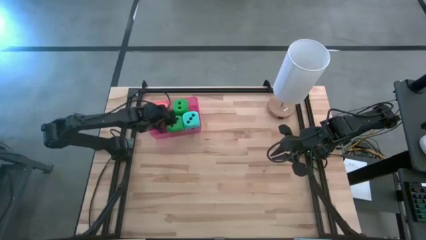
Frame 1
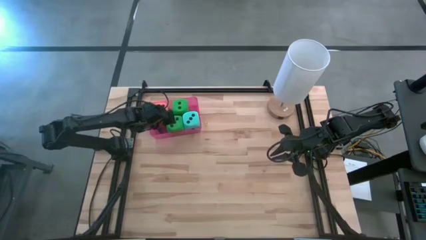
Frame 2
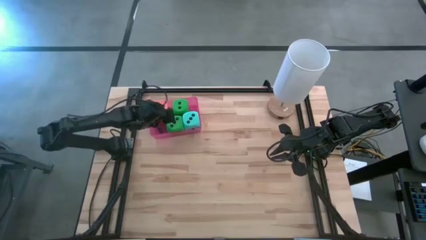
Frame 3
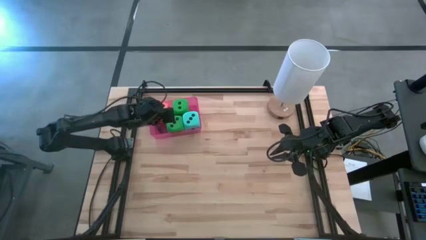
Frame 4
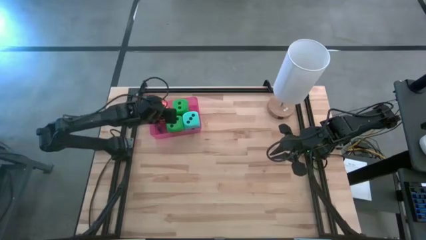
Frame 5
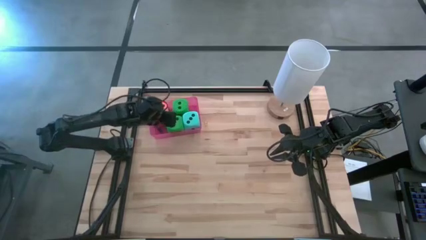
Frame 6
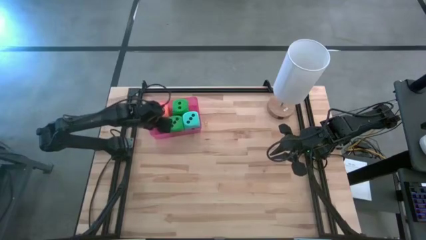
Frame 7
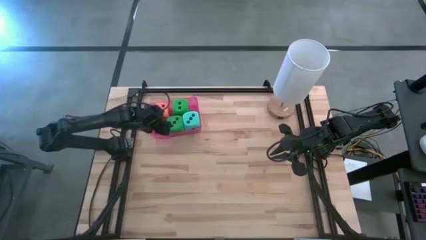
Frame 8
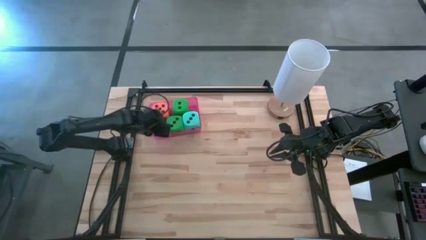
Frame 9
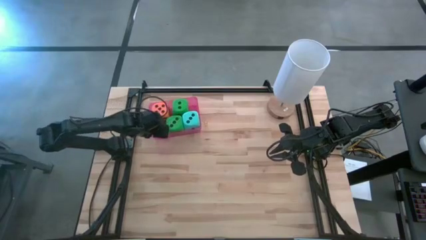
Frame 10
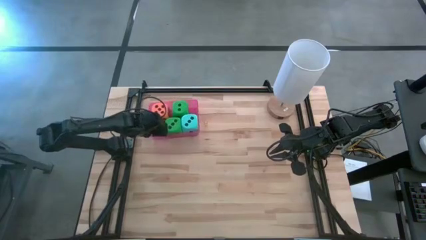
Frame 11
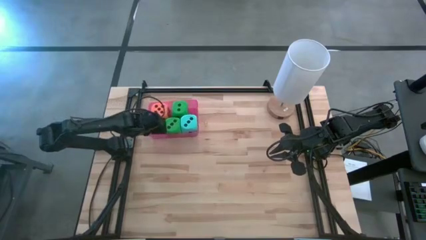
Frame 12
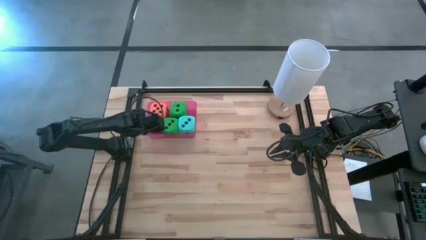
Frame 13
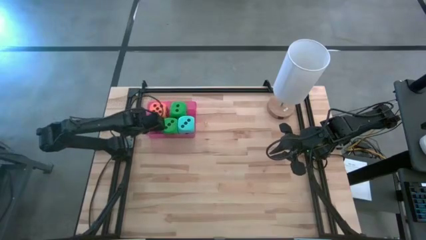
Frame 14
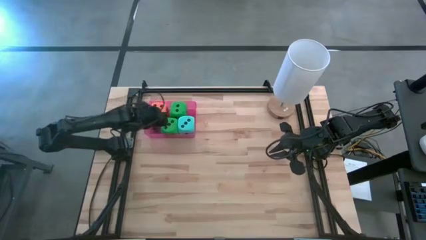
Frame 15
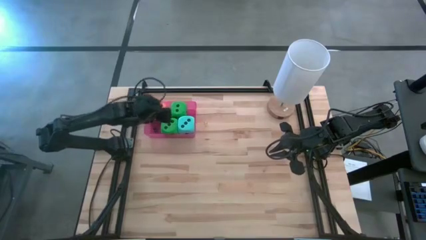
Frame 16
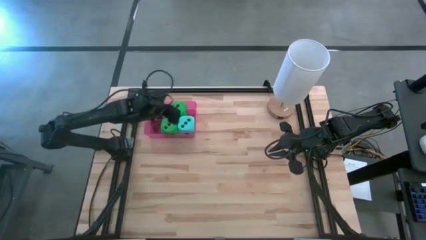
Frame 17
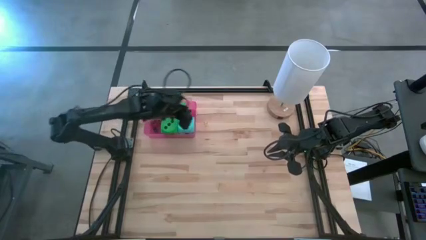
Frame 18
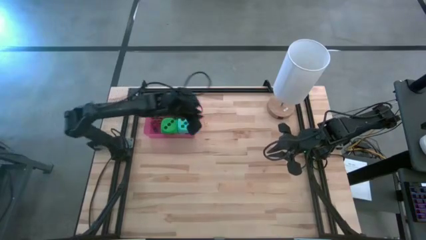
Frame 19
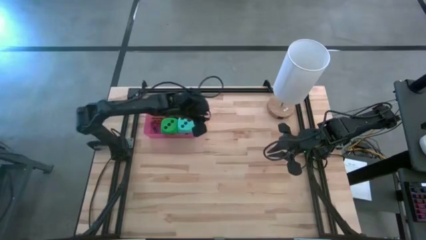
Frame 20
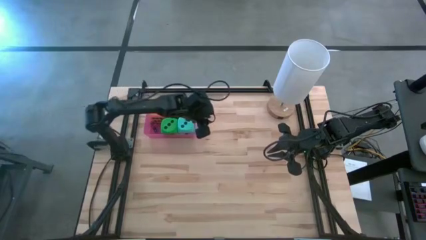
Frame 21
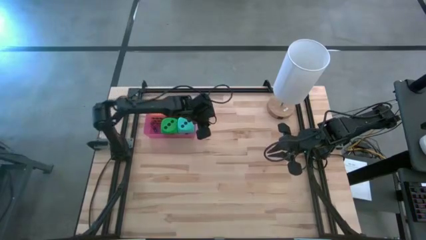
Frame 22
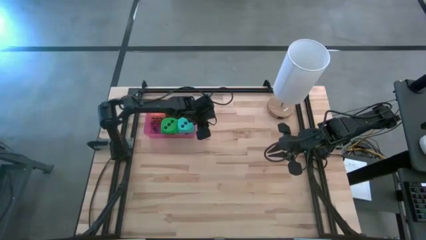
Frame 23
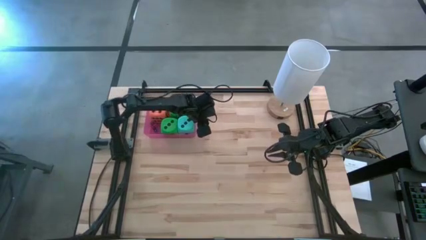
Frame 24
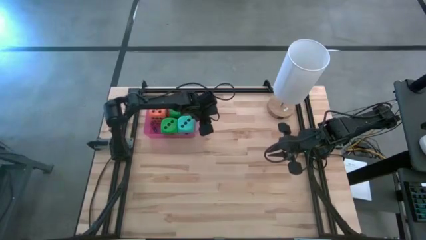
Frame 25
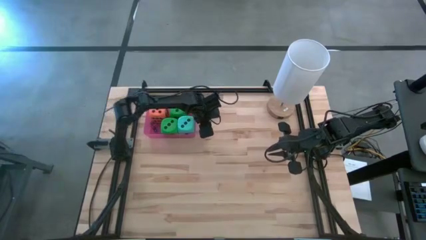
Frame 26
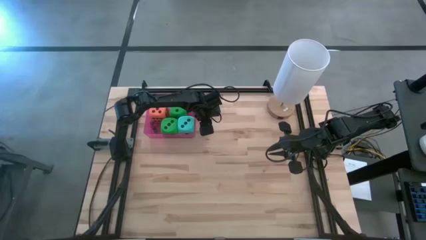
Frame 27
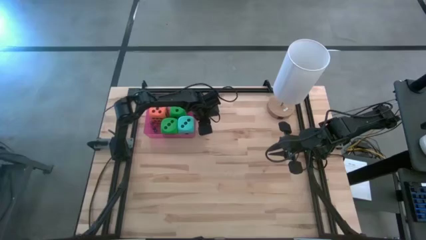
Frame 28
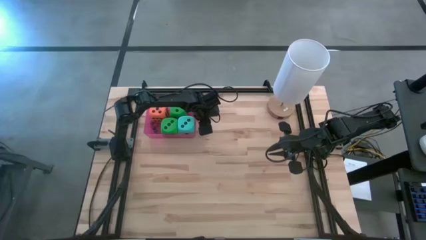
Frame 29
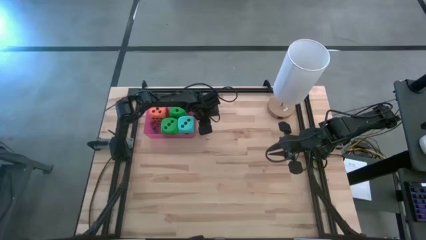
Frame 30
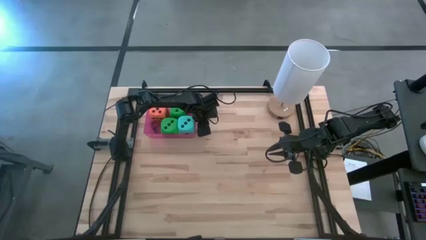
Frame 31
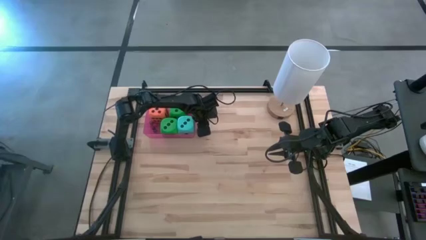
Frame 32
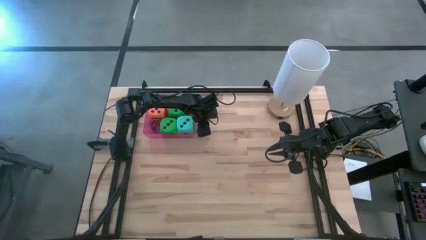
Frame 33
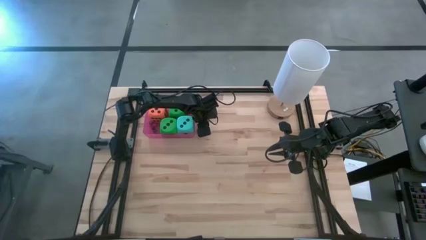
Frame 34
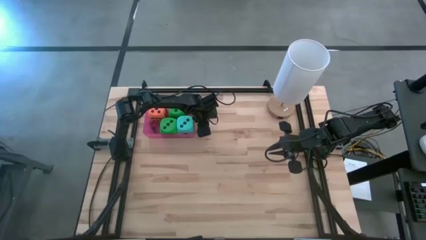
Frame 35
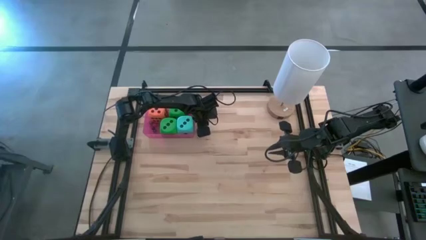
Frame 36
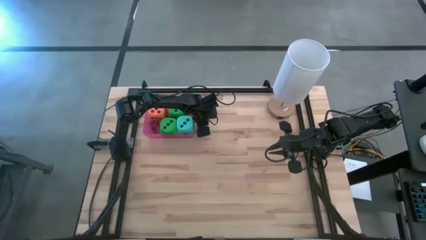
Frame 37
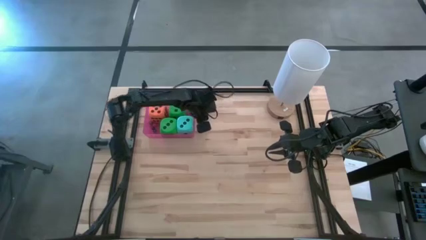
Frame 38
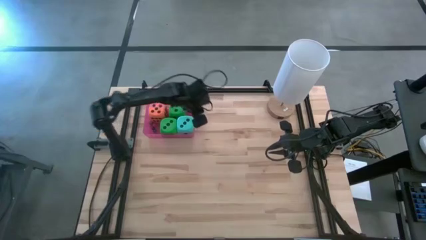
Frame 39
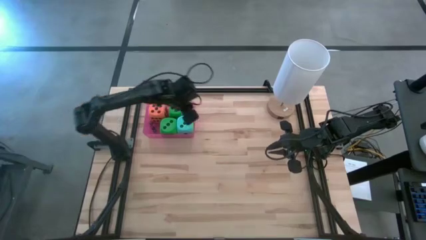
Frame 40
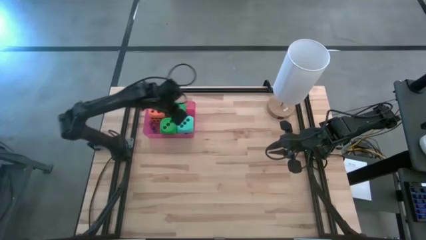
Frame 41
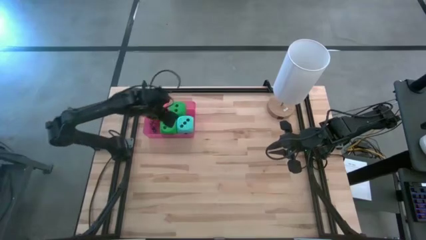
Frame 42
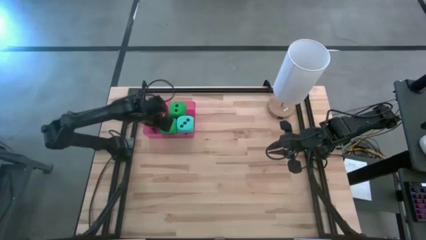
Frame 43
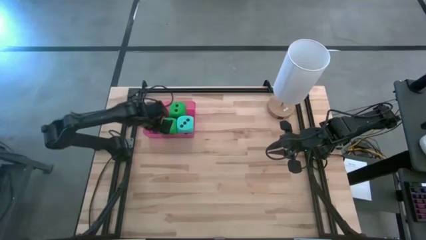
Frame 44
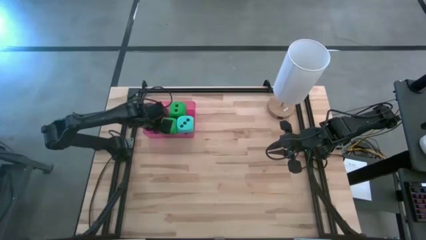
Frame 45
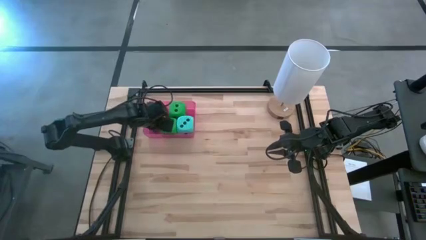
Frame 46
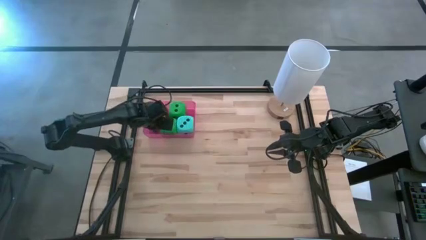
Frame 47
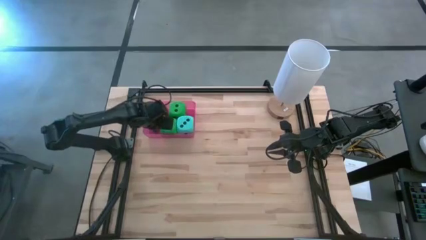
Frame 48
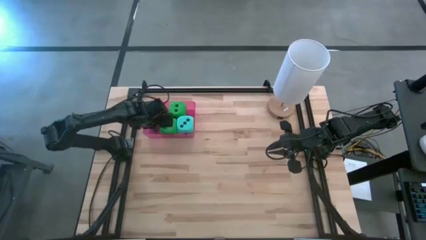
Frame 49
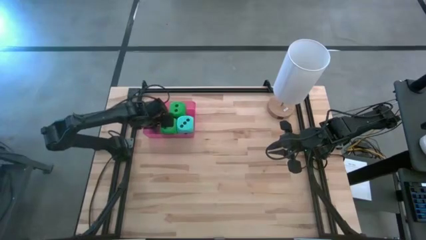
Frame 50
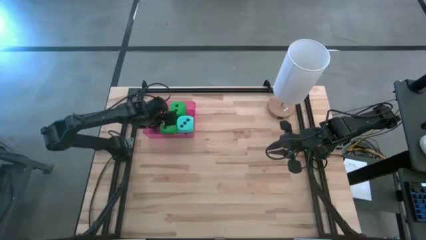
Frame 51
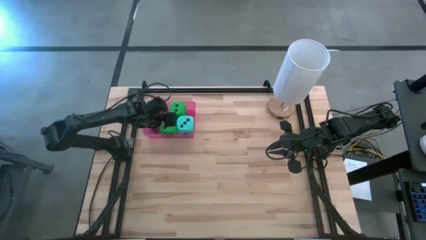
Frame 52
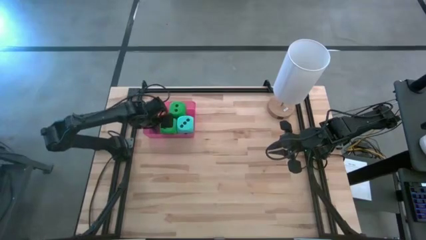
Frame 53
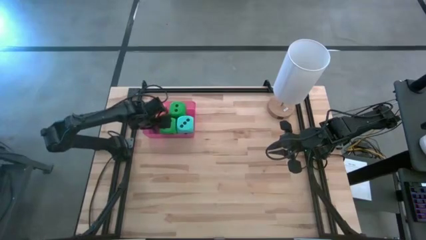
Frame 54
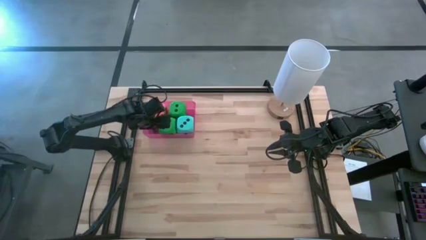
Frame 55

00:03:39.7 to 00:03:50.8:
Task: Pick & Place Dice
Put the small yellow dice into the red bin

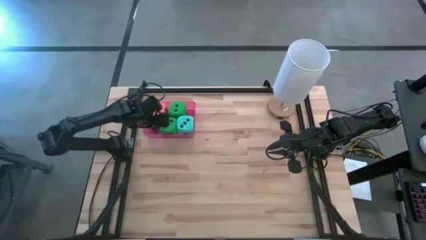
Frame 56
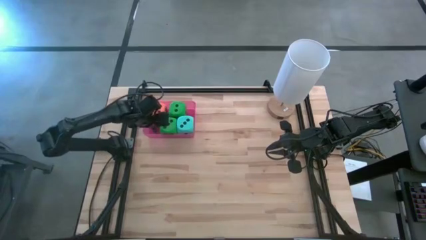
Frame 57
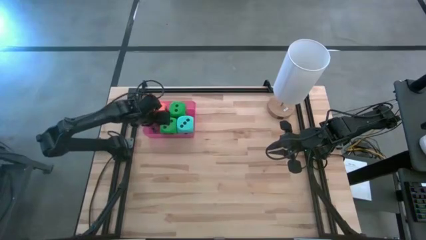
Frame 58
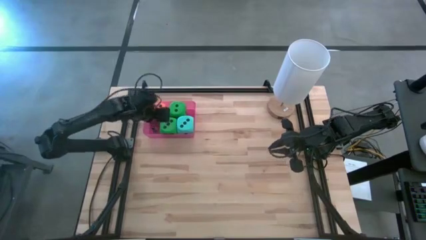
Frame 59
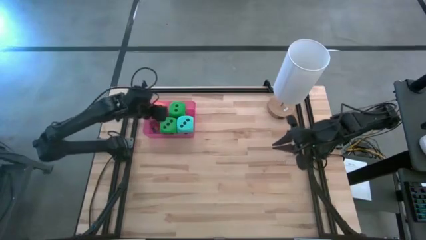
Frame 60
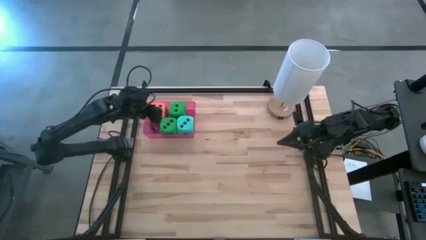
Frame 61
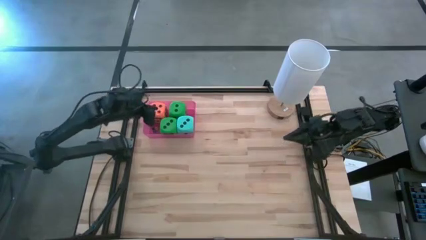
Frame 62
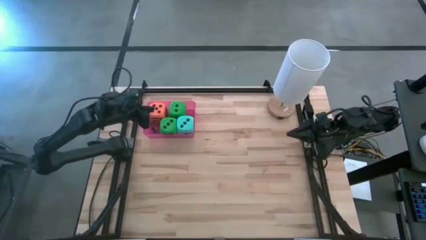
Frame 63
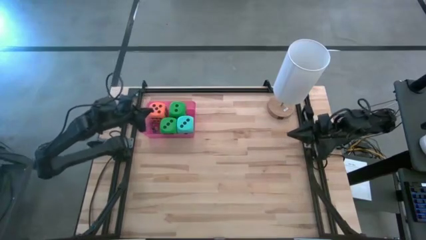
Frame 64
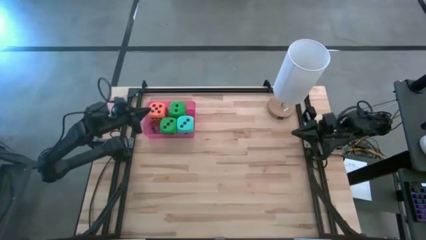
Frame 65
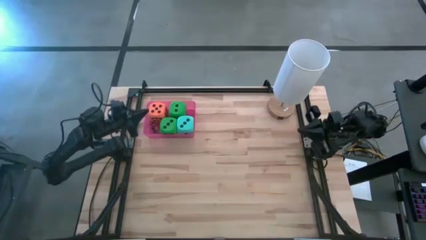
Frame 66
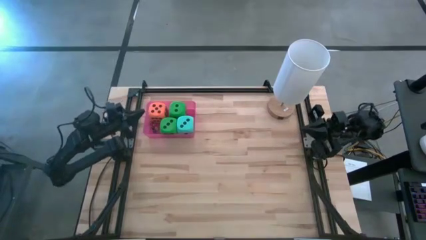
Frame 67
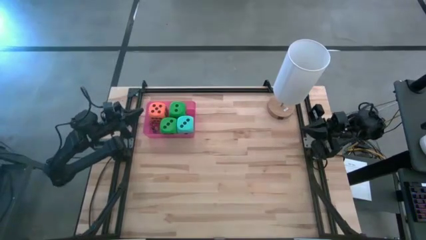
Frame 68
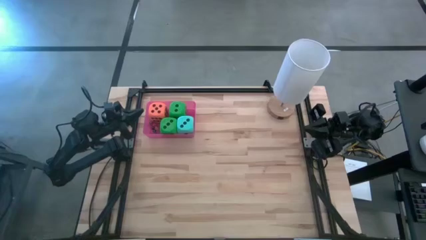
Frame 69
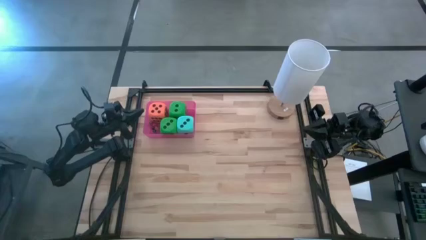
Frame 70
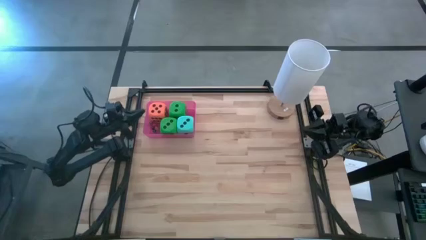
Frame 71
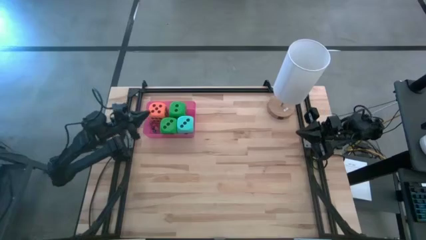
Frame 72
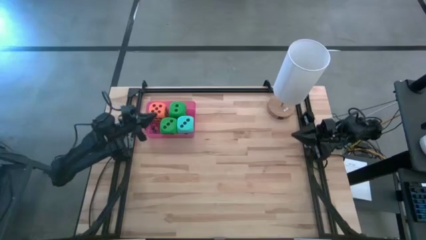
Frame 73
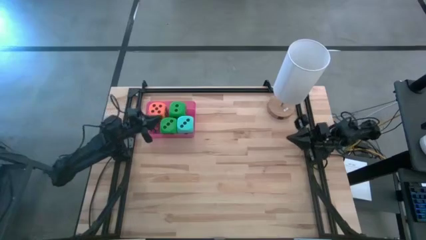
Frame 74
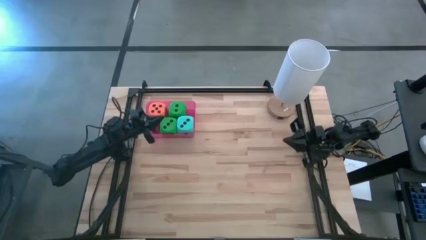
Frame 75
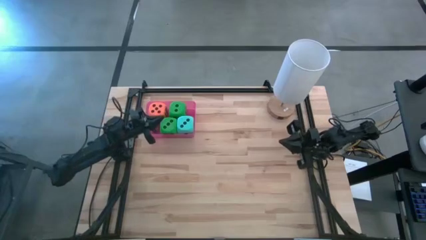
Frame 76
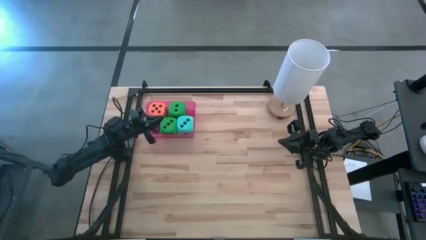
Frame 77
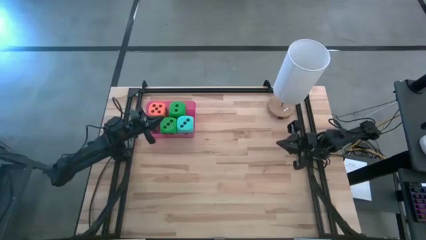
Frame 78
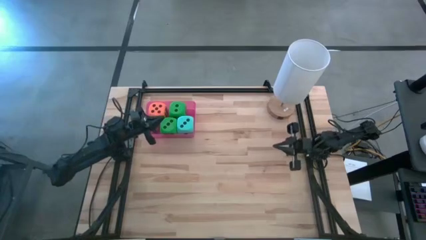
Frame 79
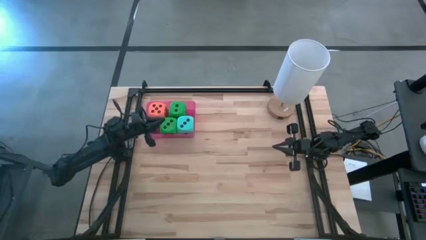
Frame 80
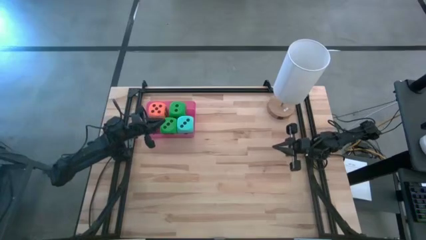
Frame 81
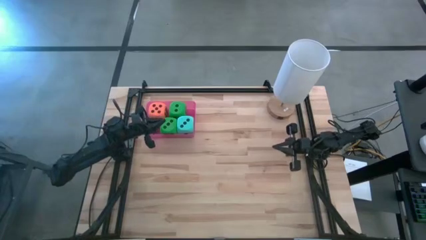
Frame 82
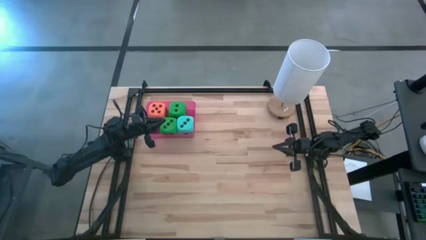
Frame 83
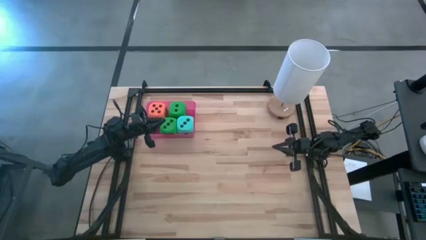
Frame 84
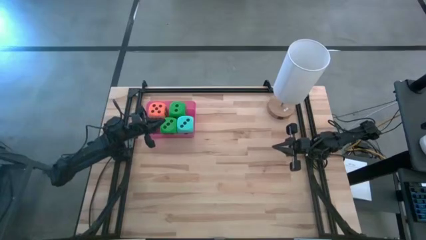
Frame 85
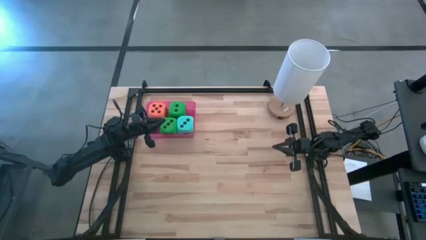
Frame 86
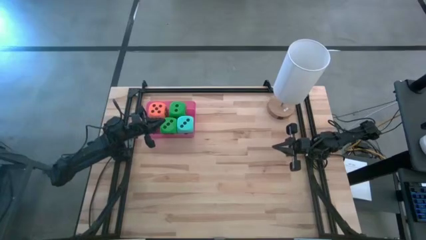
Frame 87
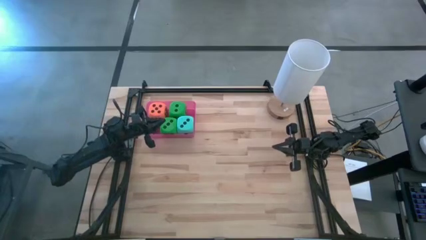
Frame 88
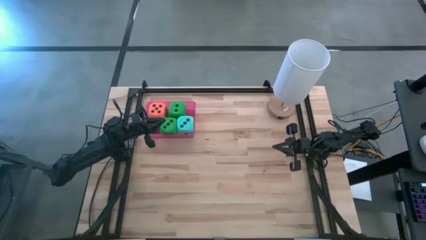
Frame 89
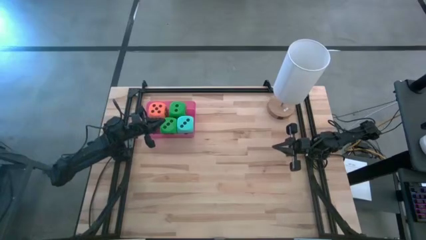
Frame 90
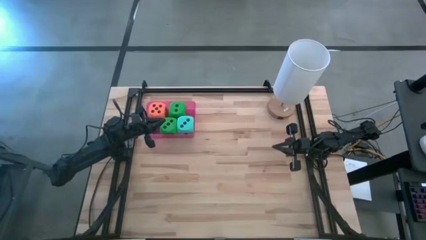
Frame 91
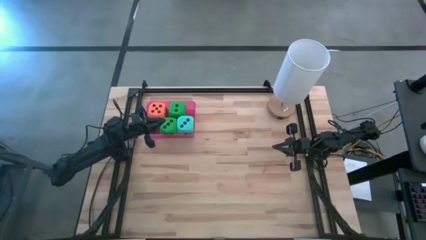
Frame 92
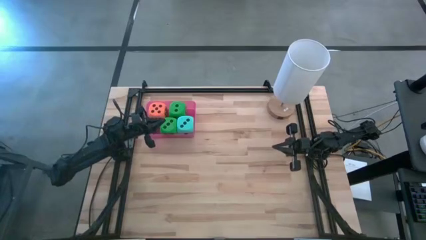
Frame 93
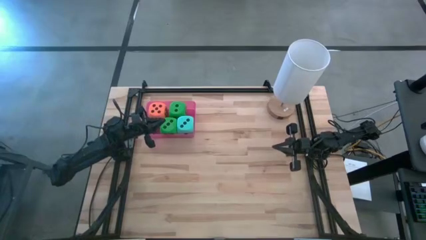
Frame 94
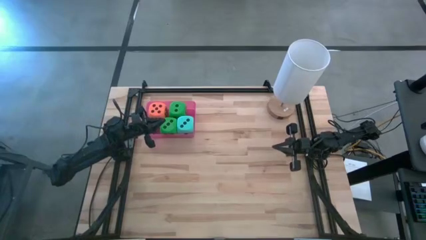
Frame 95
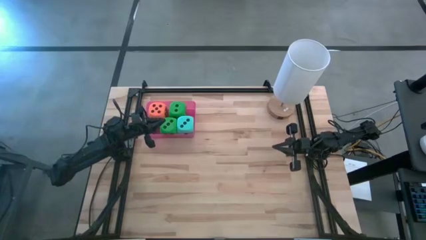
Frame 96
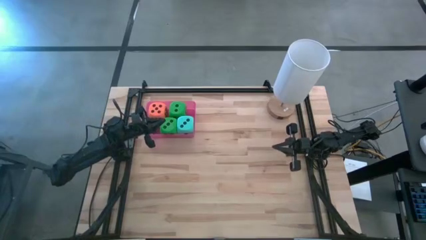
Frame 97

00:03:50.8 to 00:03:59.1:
Return to Home Position
